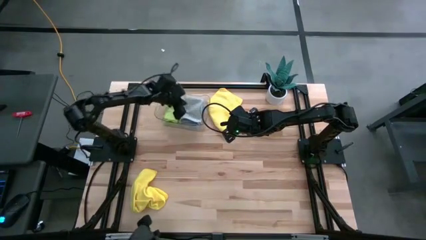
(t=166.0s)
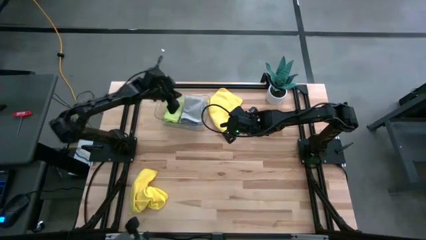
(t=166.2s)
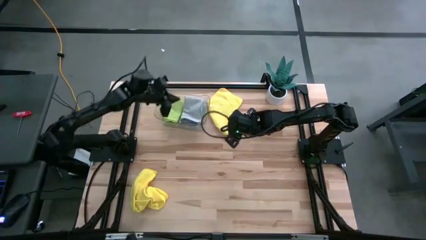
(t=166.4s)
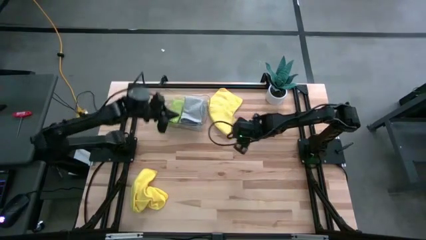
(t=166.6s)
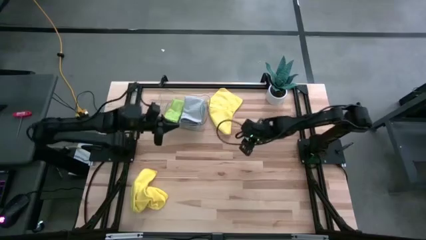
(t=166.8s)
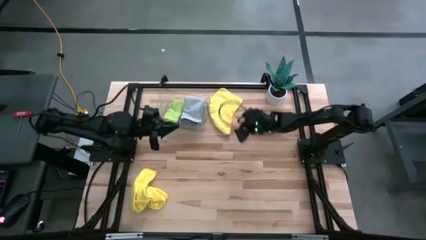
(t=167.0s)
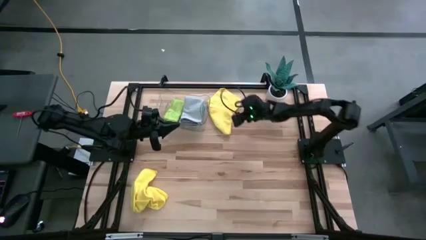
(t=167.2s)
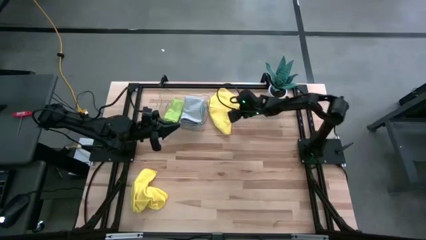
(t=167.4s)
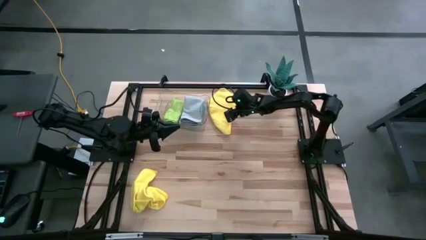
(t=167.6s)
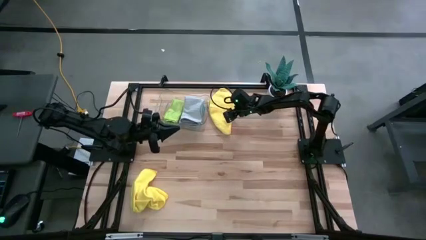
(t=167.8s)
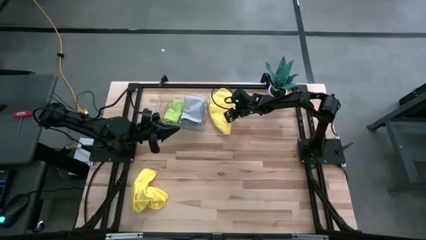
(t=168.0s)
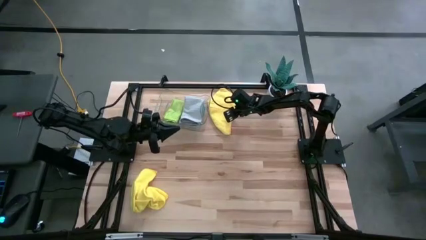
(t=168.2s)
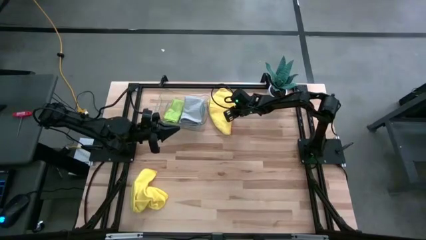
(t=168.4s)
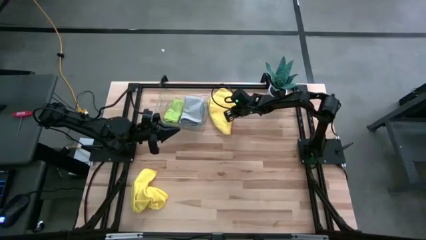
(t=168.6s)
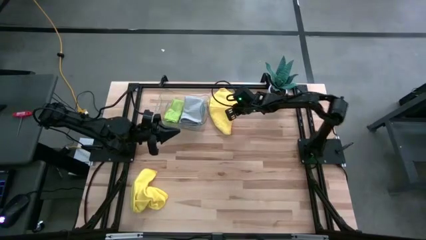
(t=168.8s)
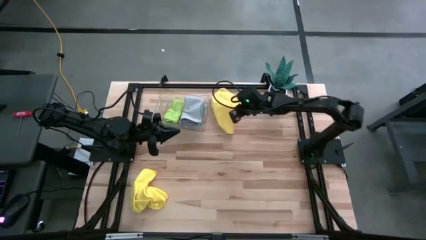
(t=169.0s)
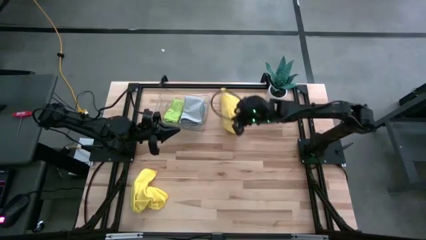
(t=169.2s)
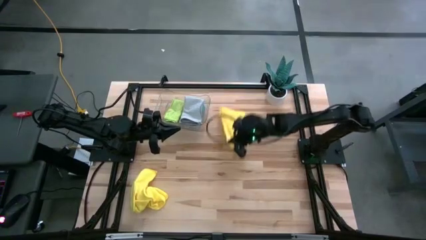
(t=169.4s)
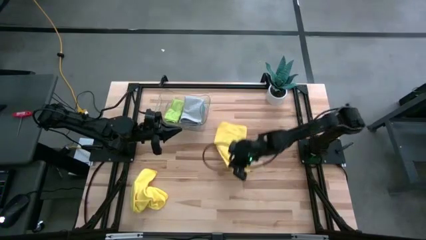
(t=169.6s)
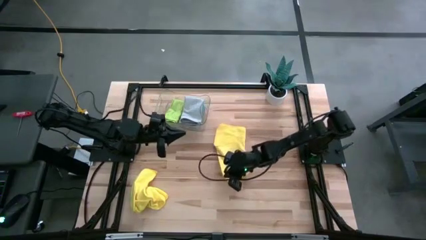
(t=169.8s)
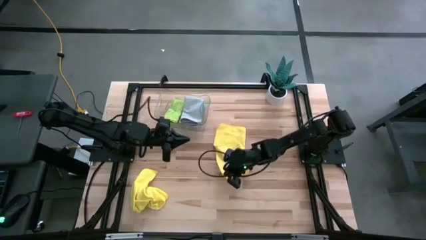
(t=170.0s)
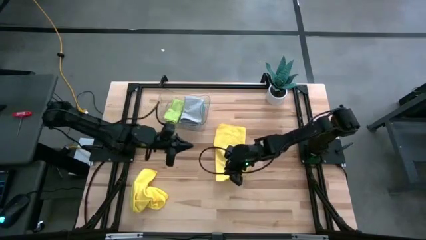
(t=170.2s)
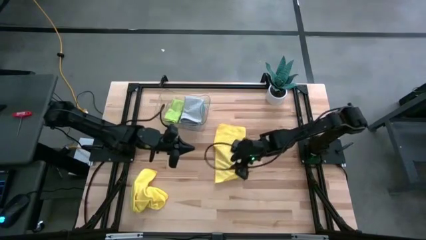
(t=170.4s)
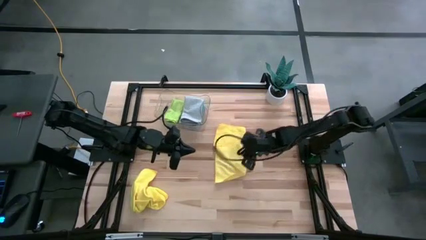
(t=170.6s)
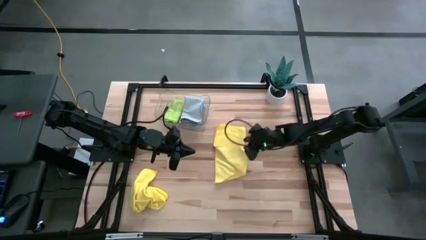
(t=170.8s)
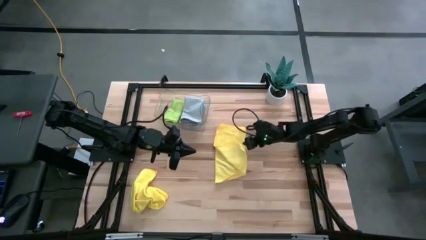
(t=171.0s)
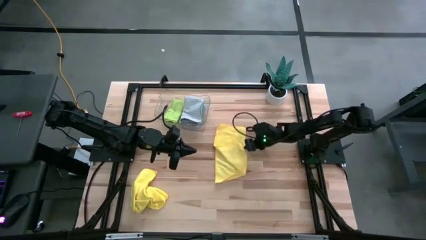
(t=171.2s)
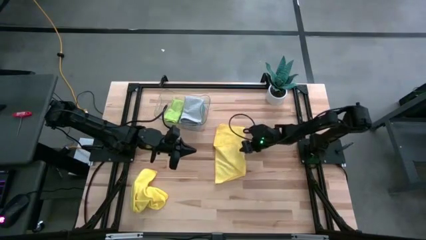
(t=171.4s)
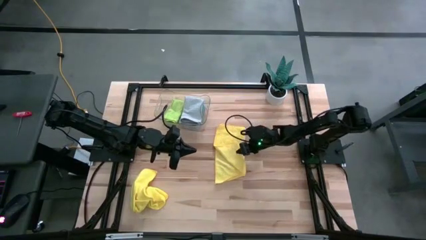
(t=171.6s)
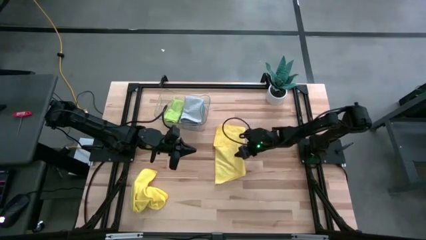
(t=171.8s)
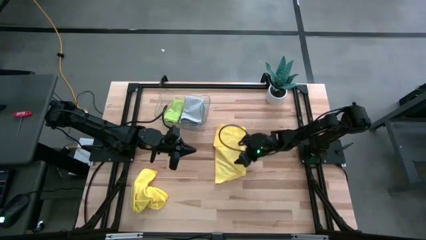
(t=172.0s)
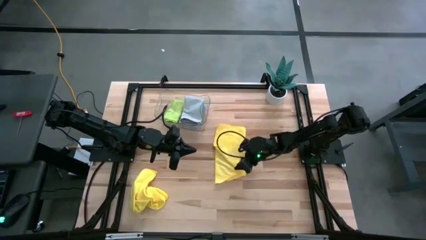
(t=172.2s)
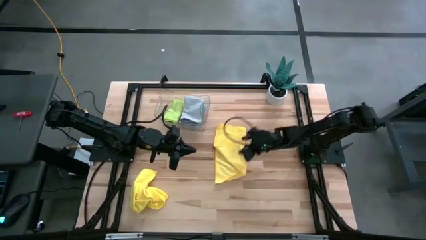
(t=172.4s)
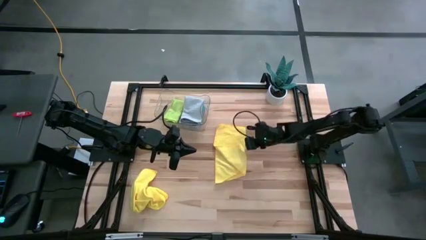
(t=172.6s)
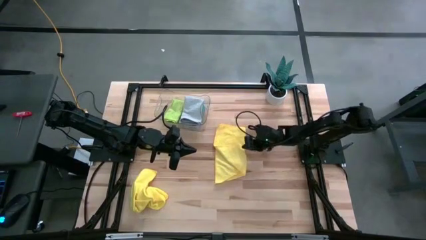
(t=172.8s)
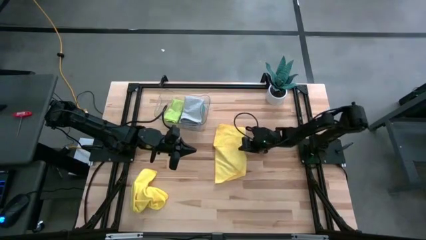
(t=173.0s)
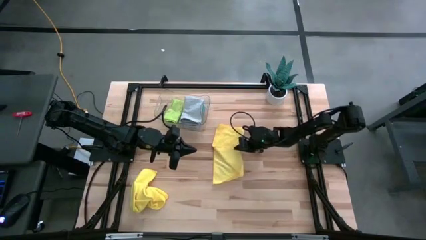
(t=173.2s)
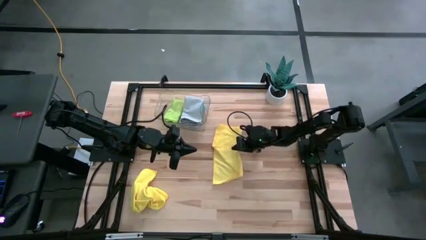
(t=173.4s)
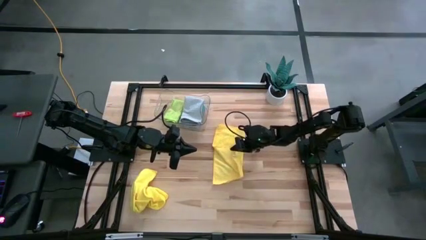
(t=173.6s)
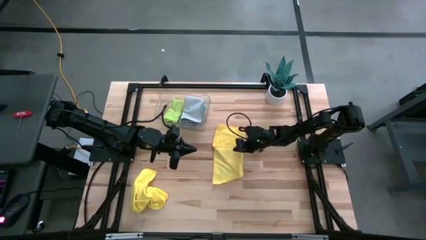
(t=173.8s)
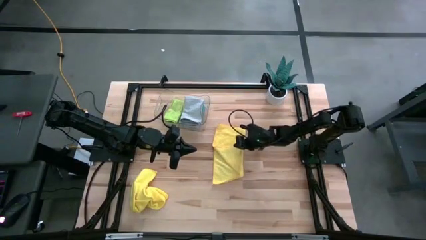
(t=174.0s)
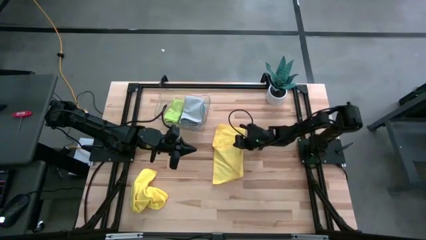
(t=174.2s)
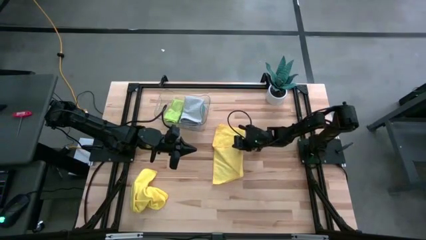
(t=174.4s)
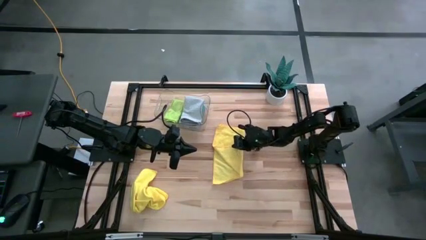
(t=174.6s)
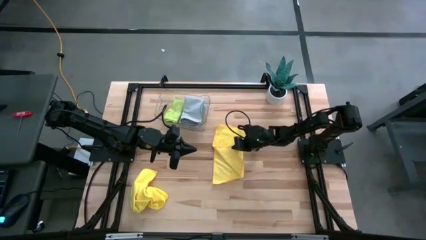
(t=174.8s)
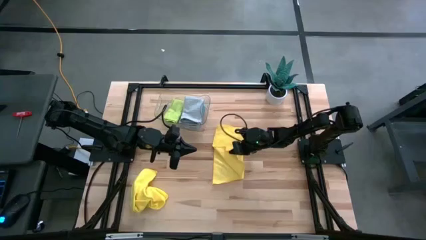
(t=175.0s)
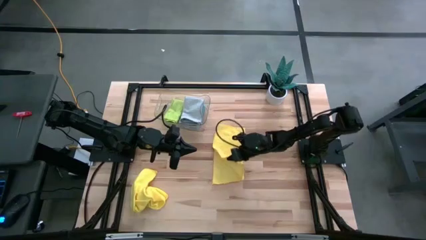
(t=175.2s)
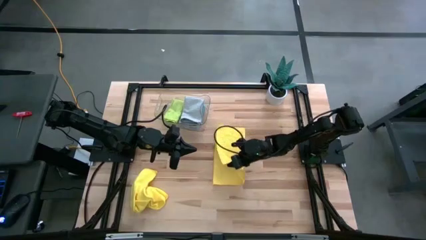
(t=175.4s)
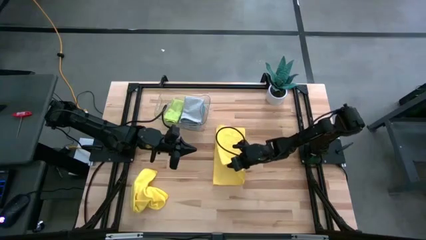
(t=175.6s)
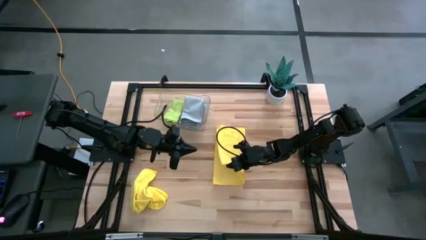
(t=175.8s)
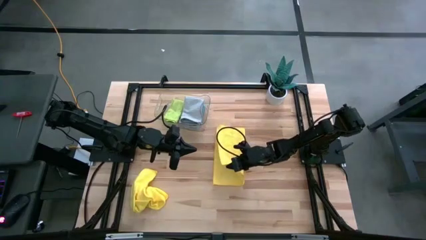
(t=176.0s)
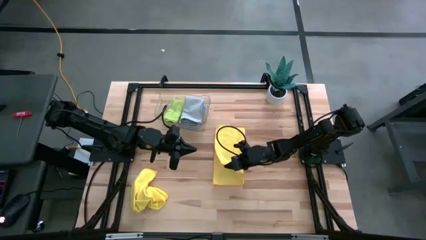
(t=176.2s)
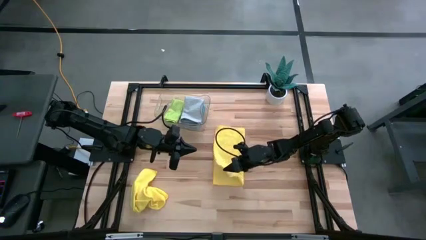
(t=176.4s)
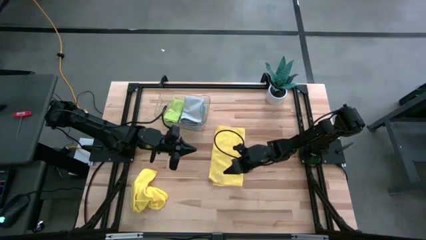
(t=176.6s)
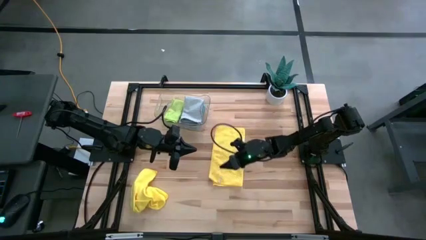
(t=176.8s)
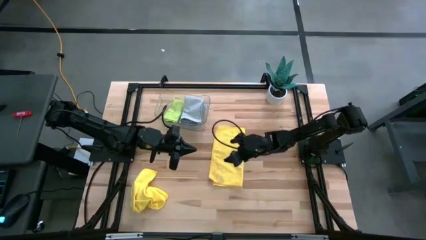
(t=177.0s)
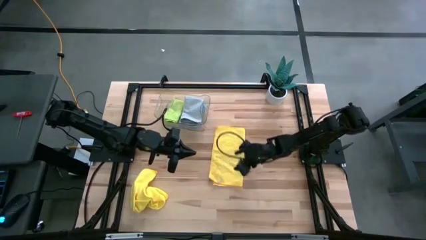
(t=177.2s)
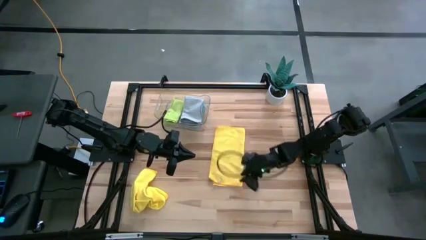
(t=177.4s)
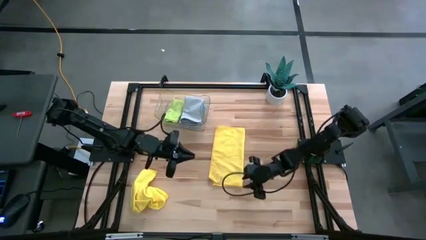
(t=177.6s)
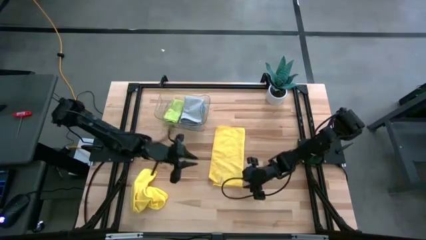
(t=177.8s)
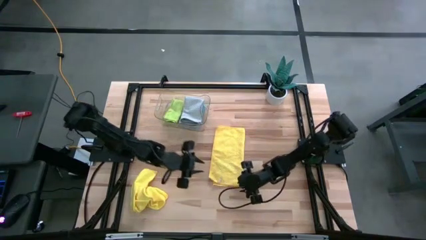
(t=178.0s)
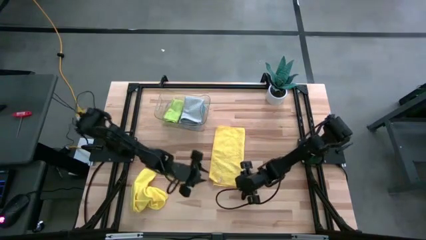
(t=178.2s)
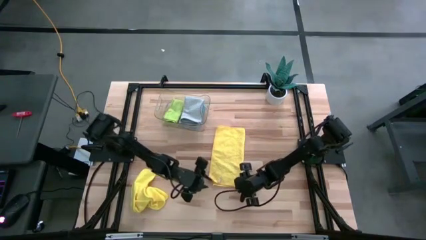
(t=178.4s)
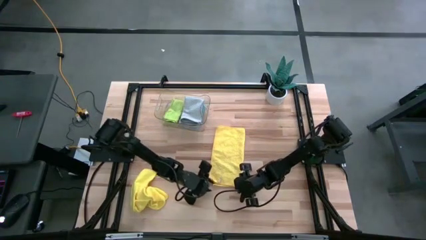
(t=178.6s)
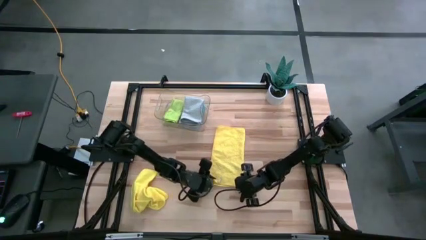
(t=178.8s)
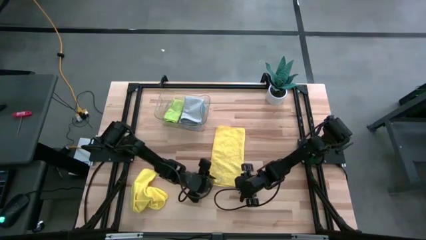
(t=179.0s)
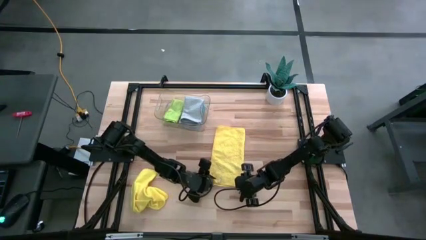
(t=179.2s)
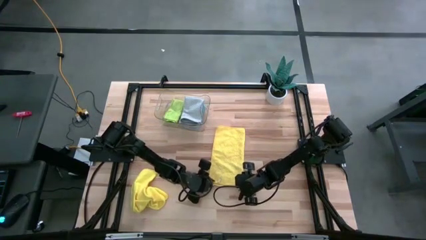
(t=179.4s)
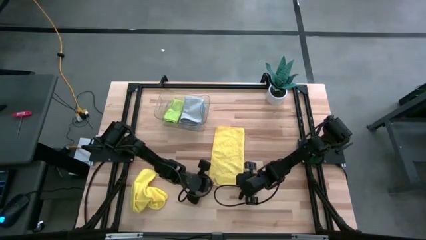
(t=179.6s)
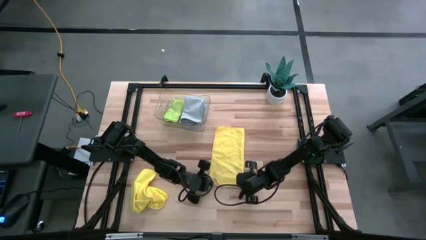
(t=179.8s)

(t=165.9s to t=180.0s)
Task: Fold microfiber towels
Fold the top yellow towel
